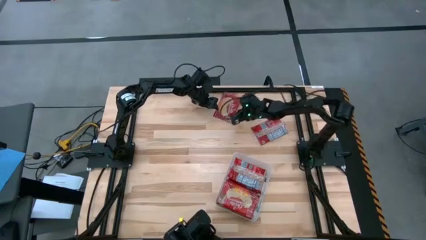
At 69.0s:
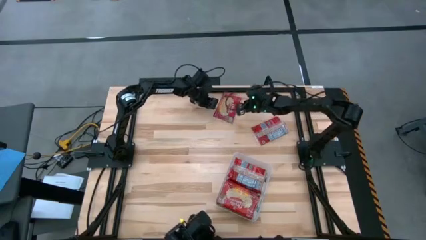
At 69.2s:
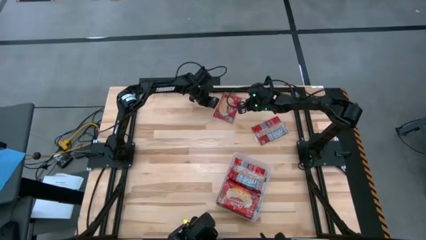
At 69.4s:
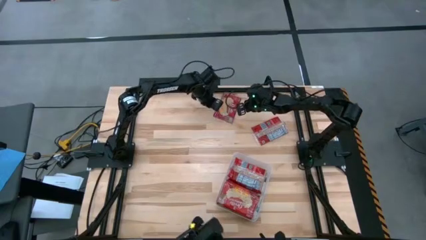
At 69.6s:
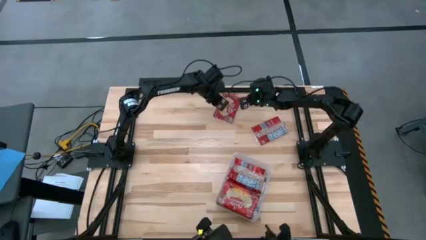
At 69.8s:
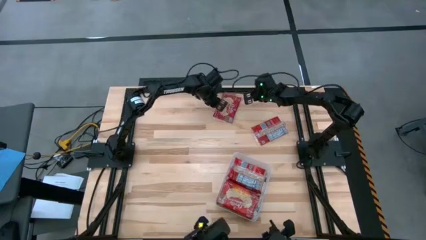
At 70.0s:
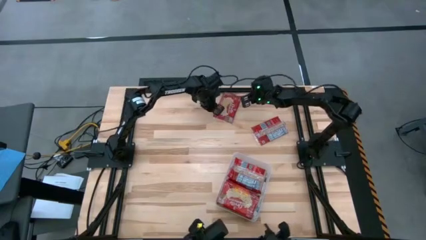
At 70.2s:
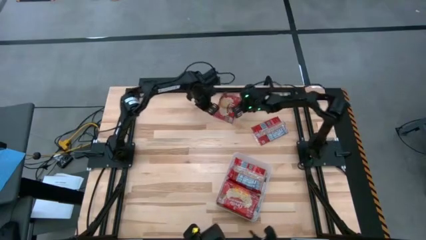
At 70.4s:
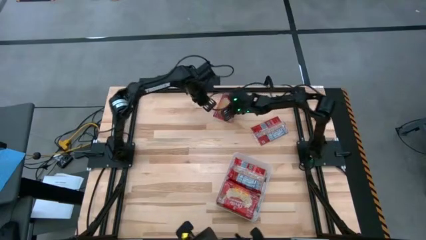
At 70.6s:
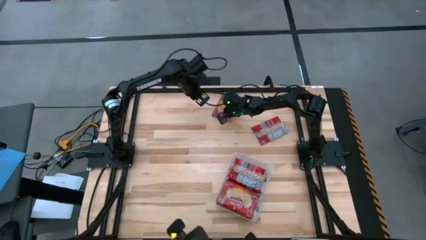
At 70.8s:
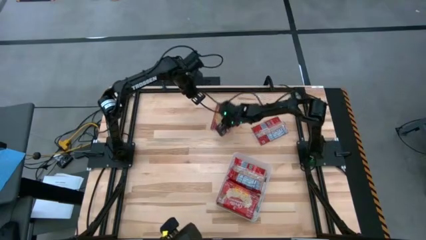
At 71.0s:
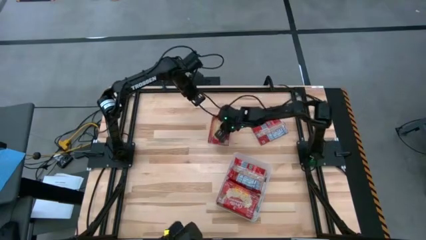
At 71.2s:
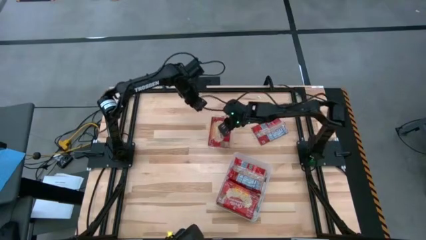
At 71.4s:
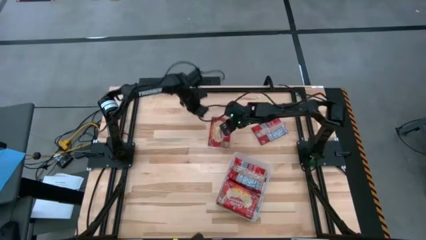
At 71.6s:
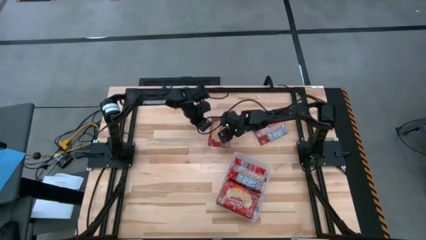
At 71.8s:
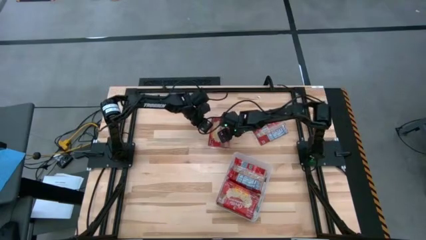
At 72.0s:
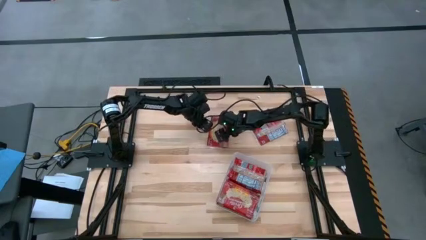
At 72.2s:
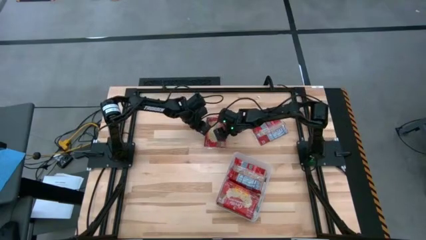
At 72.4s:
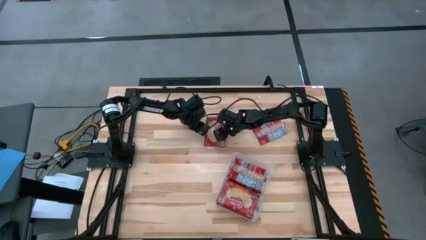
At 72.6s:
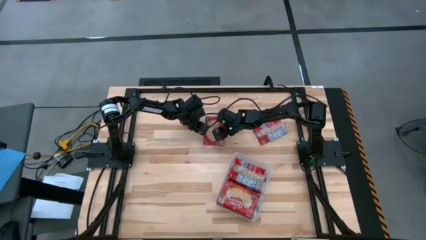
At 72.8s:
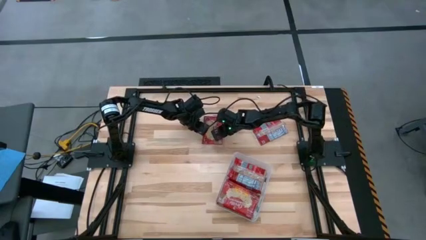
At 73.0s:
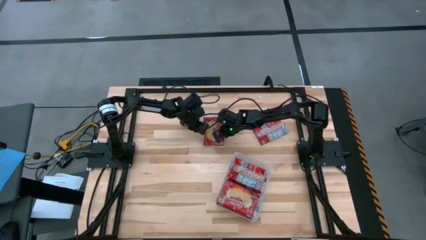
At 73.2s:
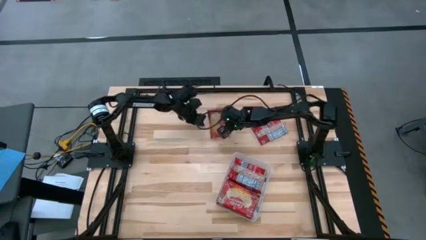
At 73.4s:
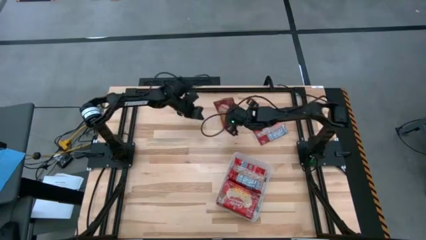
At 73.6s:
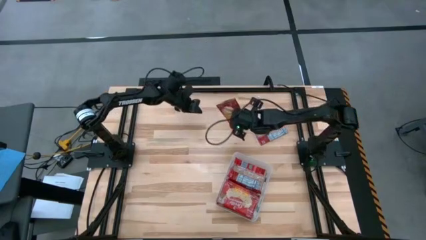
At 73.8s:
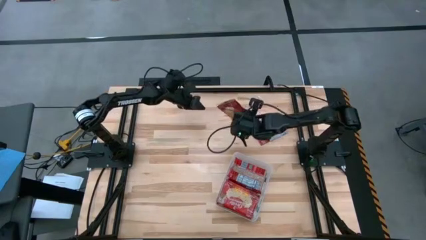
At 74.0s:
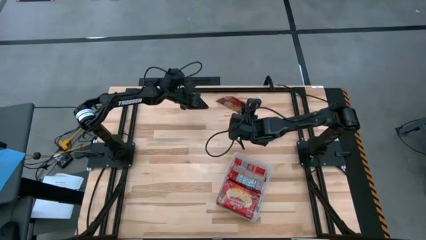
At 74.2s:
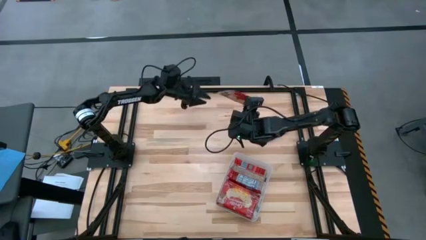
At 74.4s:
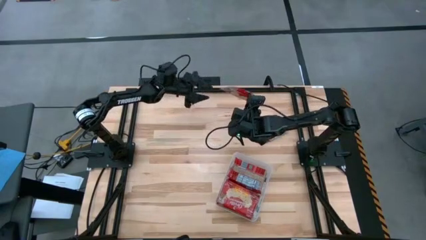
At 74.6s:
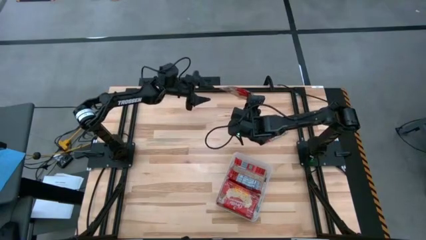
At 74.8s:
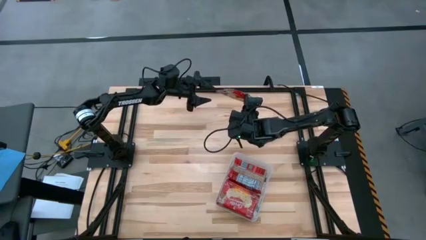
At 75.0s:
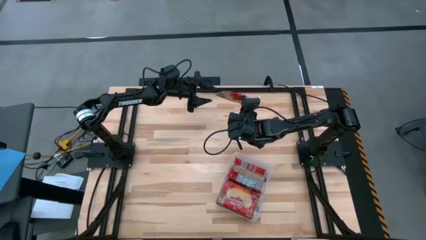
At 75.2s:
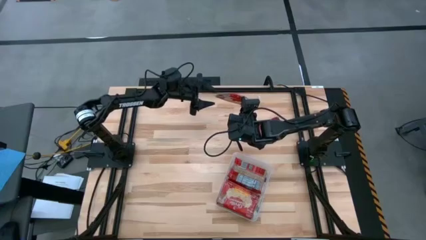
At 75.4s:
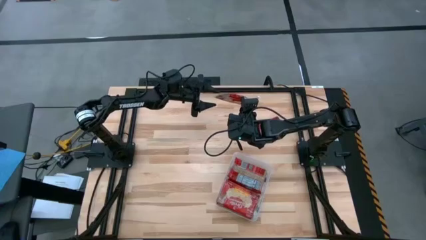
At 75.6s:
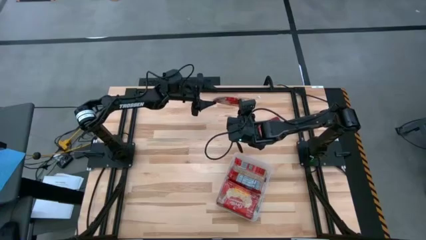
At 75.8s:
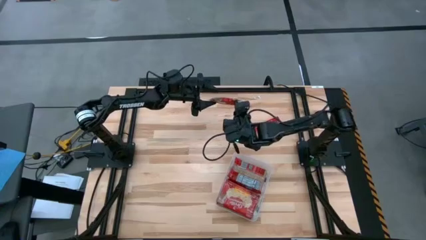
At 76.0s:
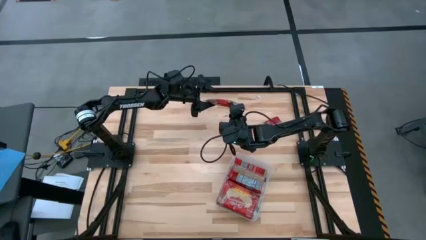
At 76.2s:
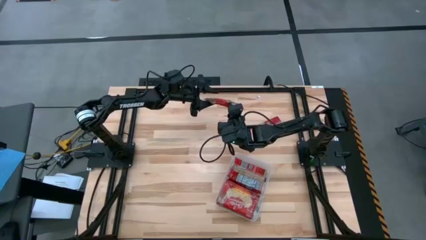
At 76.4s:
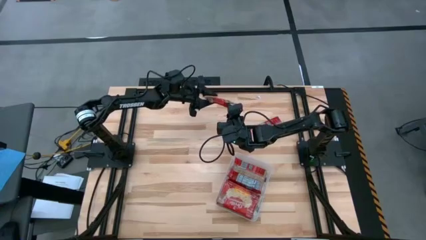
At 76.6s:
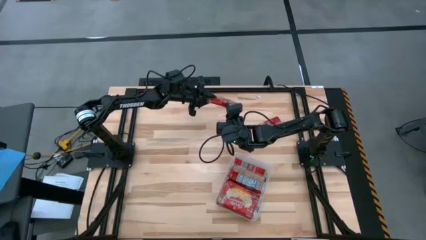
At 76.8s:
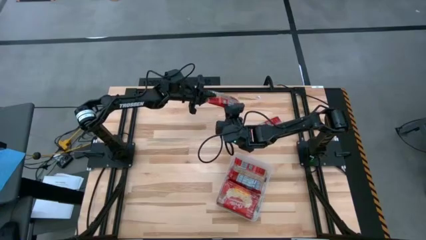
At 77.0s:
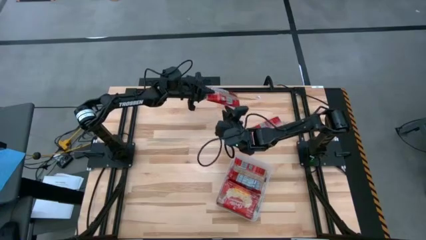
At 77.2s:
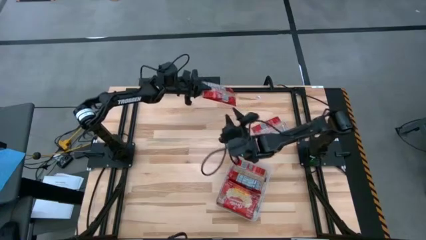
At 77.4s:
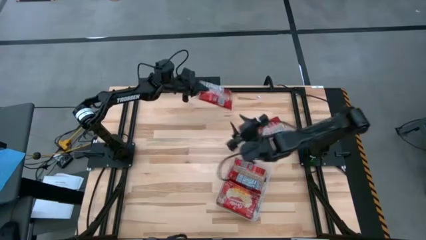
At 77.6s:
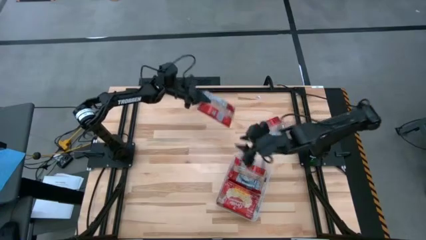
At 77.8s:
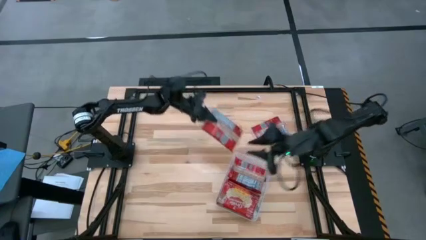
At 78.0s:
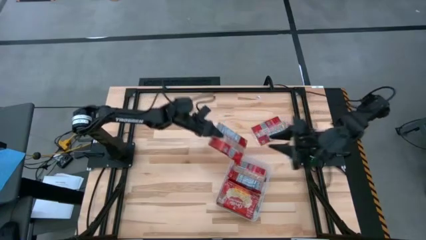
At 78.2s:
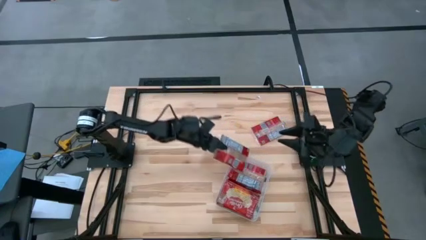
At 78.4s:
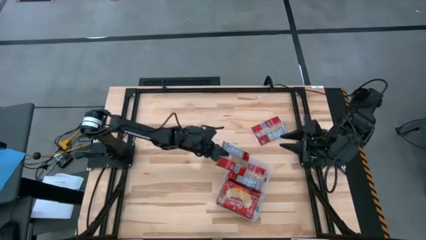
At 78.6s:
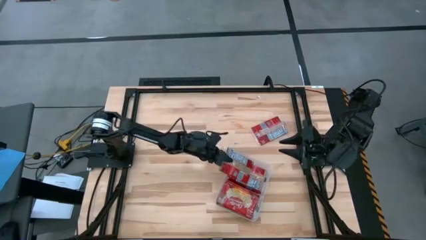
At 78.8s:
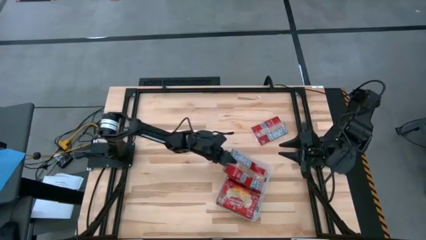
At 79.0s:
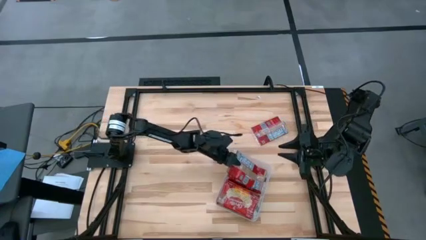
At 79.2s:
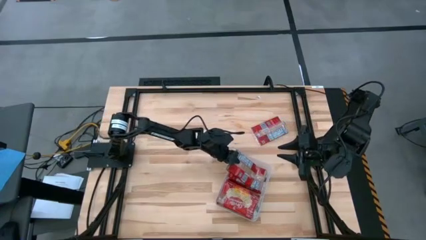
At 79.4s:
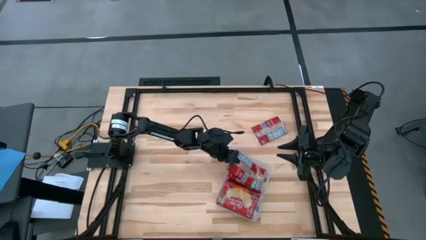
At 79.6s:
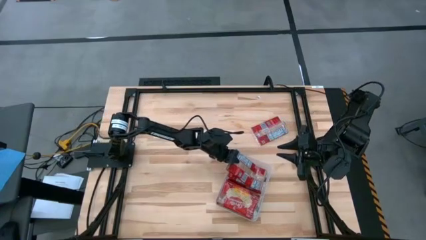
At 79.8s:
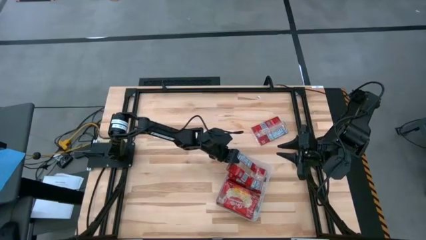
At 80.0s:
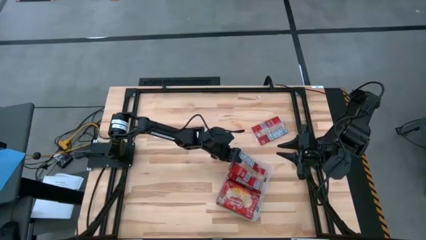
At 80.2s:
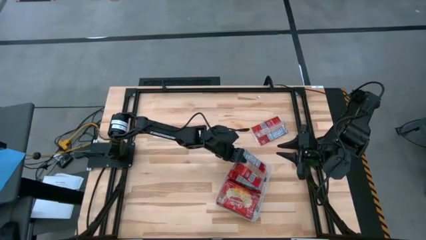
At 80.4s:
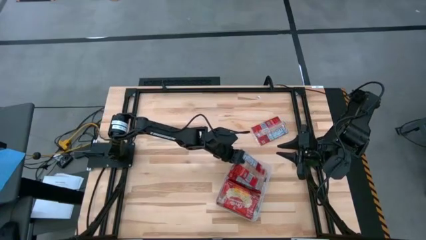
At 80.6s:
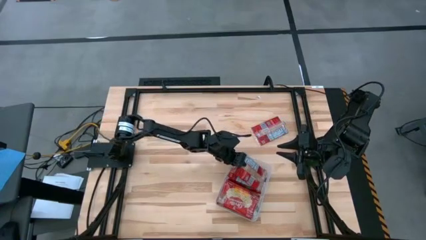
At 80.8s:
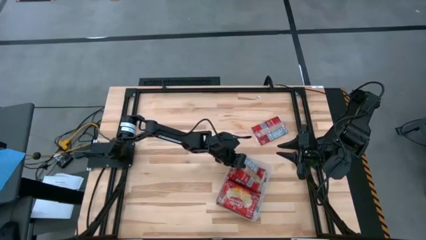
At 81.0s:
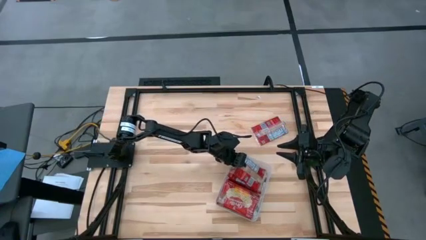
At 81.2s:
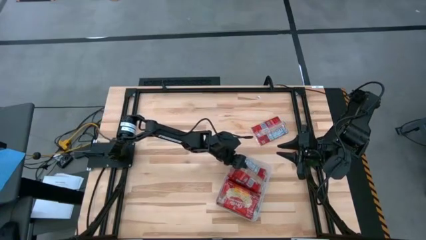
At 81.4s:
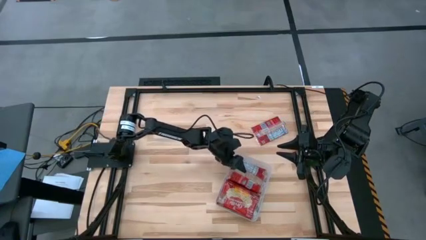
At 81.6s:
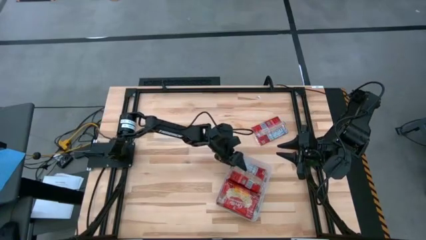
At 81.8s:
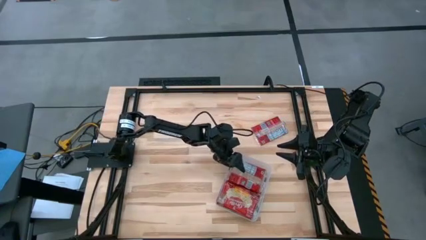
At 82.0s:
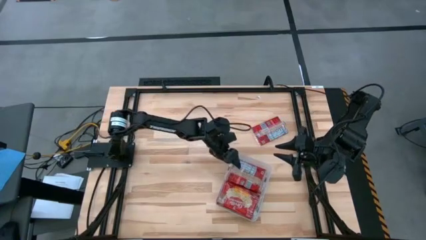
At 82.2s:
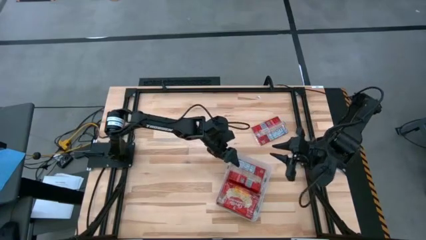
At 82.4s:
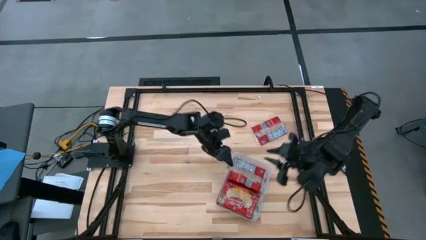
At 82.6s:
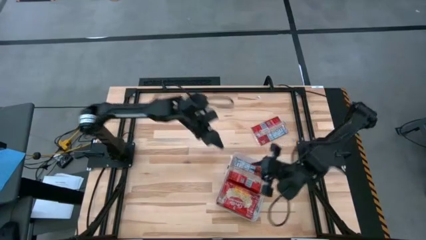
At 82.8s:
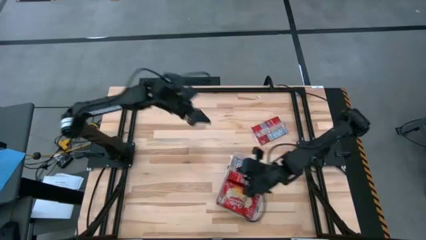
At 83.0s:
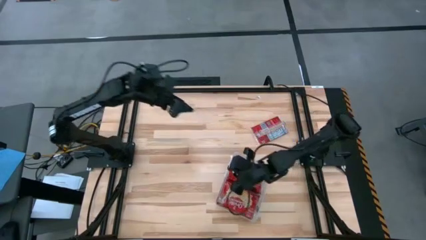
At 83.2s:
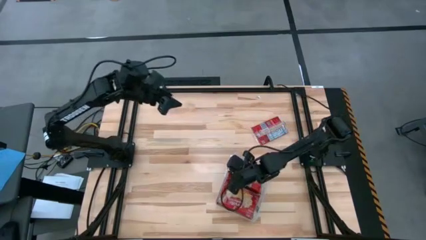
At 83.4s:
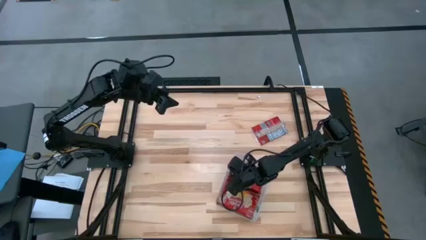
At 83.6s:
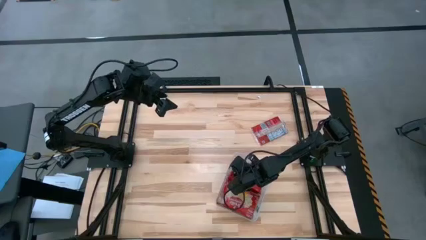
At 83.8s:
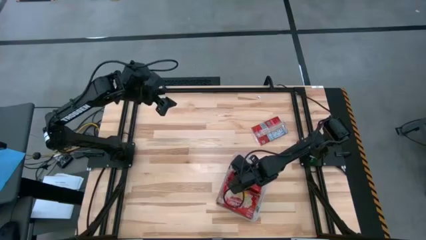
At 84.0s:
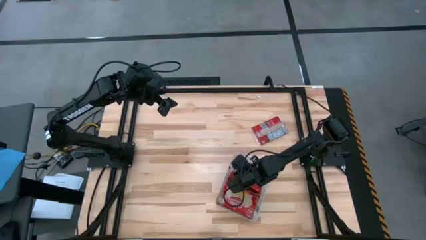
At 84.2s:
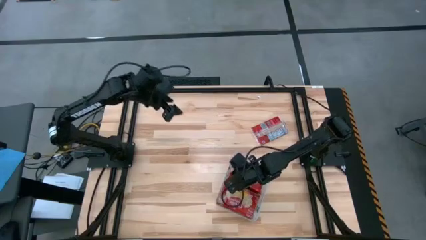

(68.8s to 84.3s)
Task: Sort popcorn bags into baskets
Put the red popcorn bag into the transparent bin
